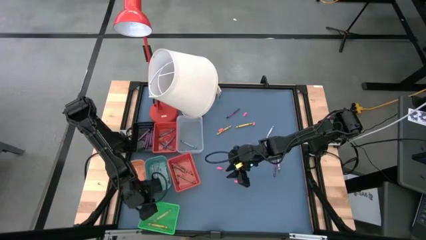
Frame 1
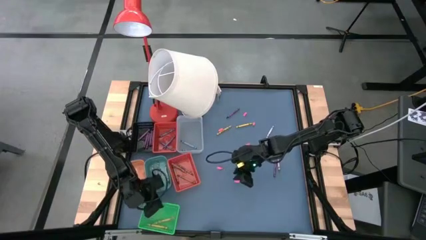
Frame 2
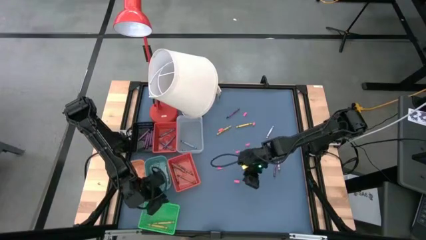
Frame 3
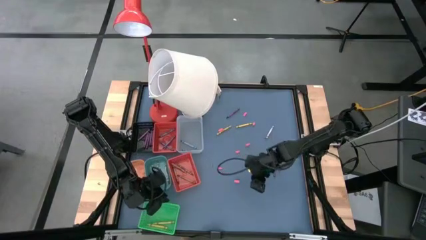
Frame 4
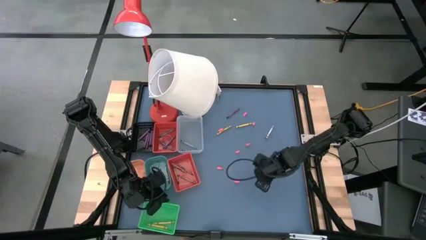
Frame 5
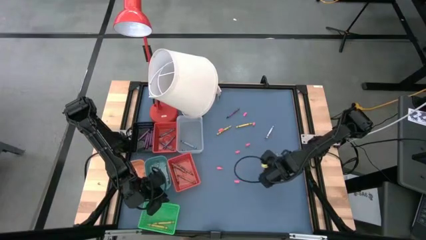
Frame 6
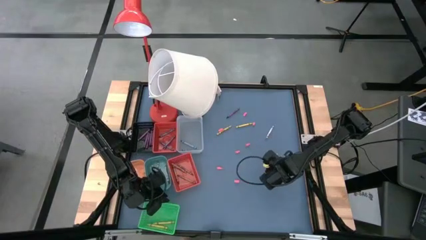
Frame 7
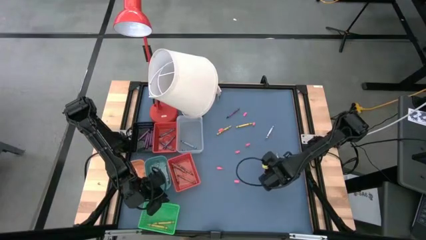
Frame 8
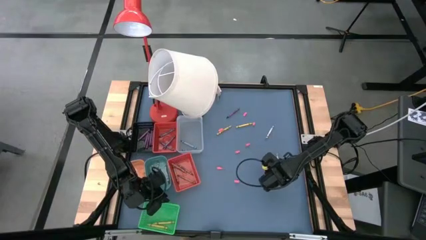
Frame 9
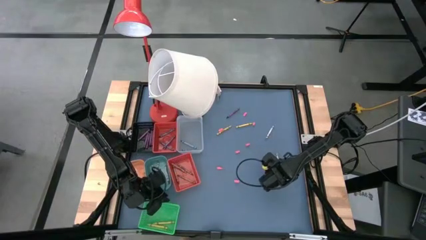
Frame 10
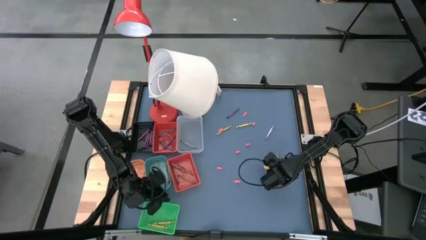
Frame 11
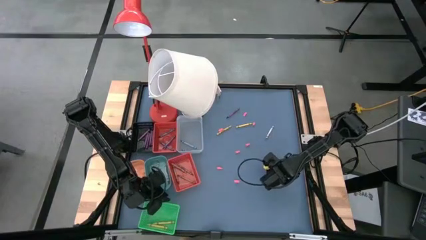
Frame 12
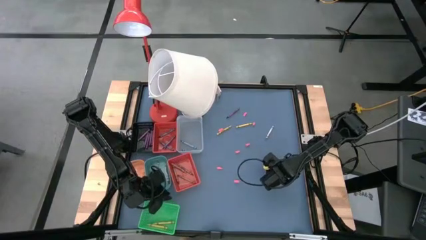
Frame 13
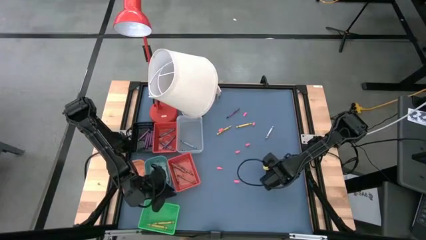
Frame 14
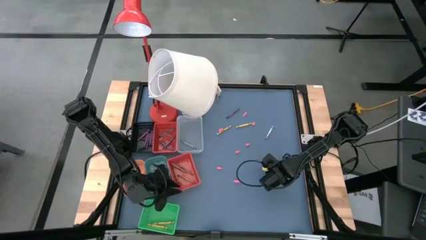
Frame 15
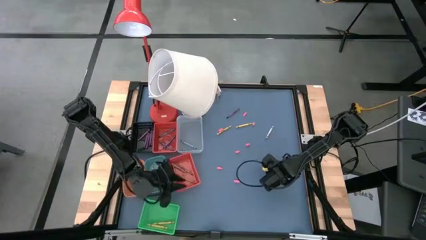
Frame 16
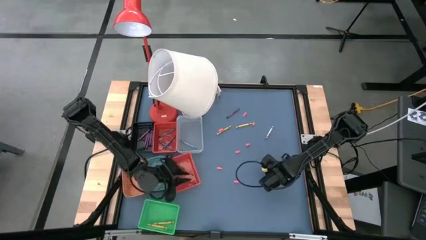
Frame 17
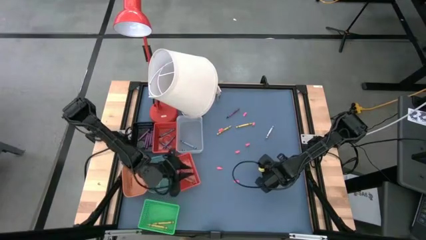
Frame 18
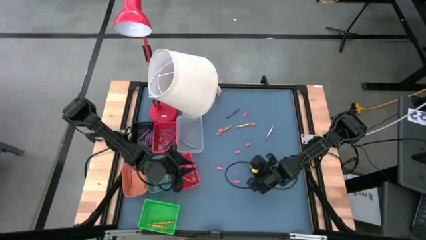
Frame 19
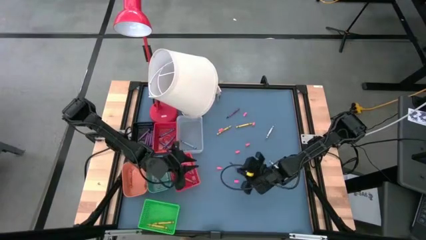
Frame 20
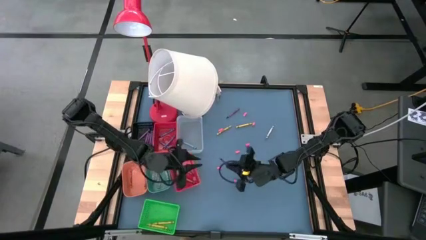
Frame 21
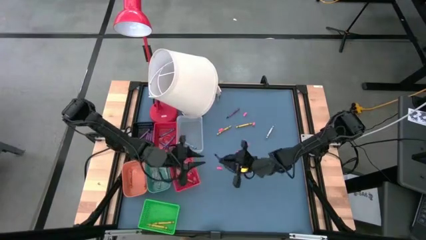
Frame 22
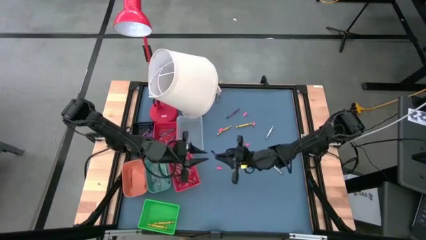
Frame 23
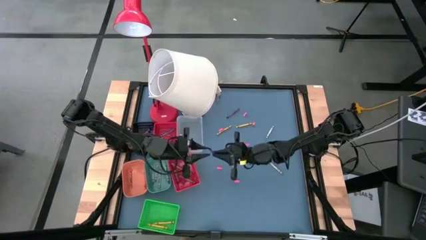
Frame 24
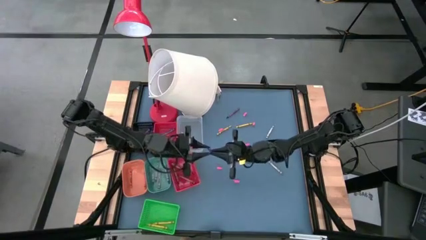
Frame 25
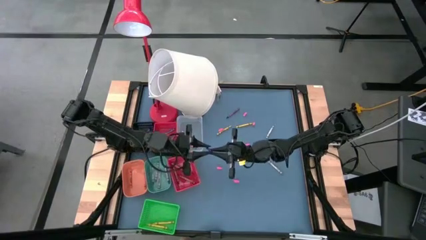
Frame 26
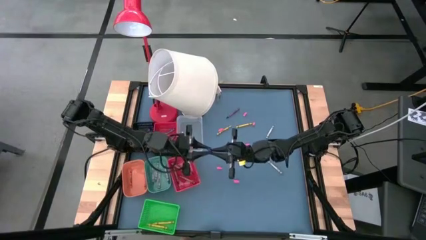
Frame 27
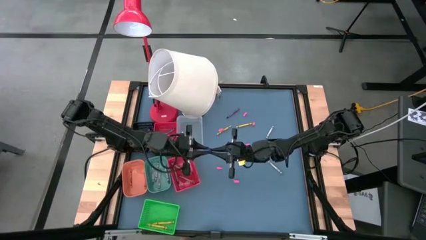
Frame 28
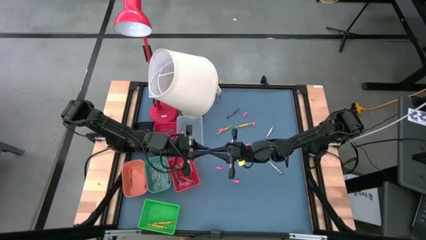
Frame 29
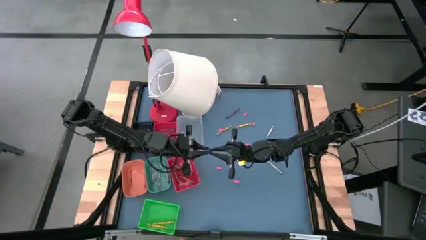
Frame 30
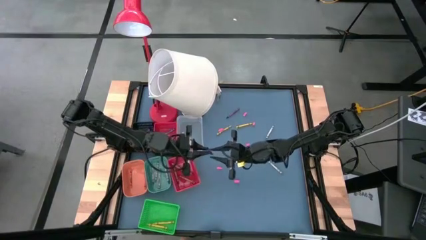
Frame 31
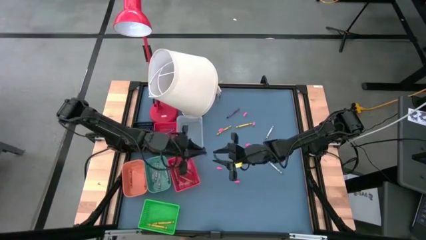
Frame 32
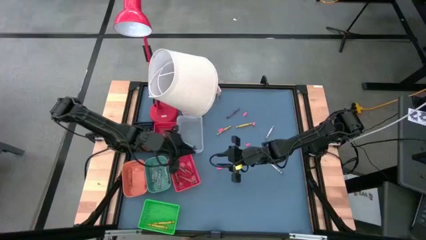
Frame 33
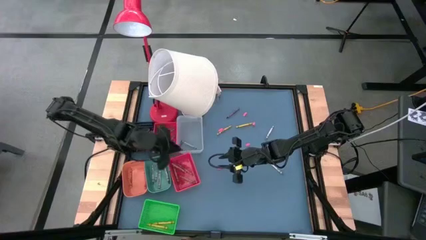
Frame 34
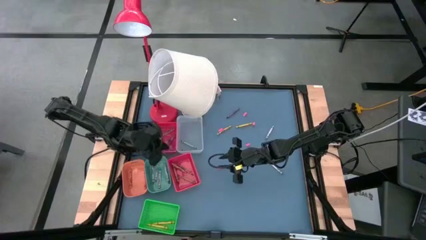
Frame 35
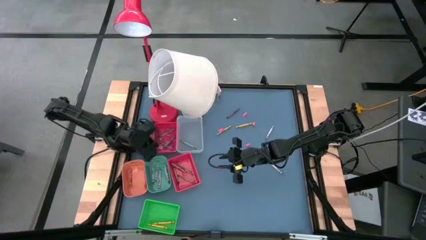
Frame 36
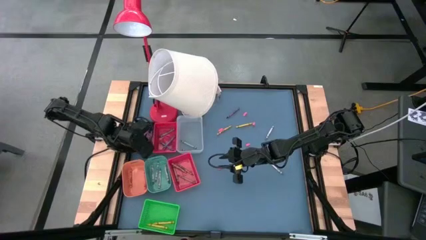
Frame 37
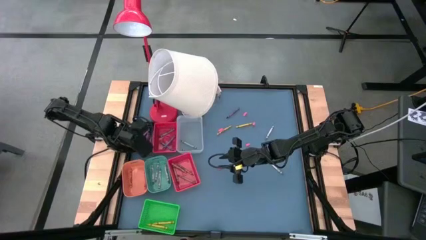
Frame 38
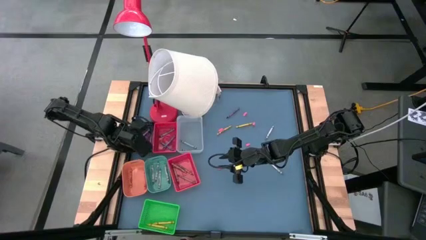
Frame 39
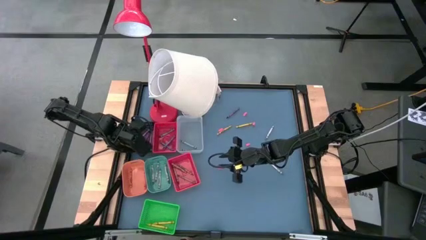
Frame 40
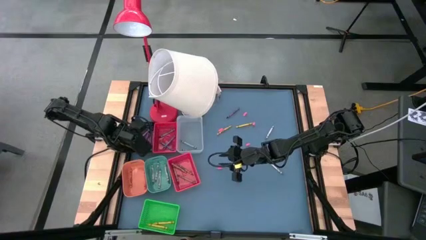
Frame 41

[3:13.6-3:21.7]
Task: Sort crayons
Put the violet crayon into the black bin

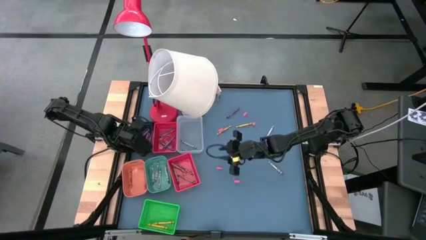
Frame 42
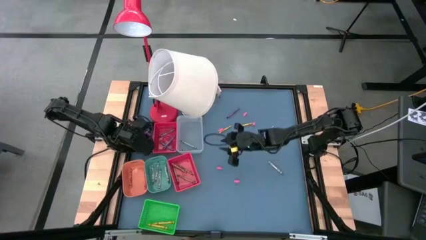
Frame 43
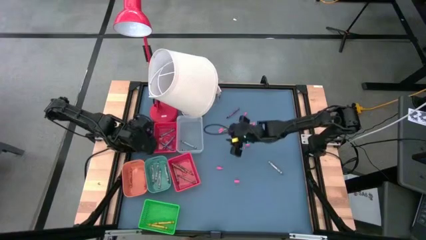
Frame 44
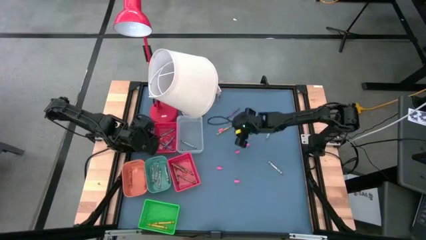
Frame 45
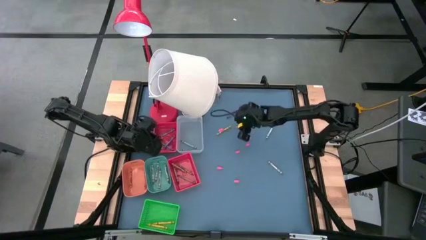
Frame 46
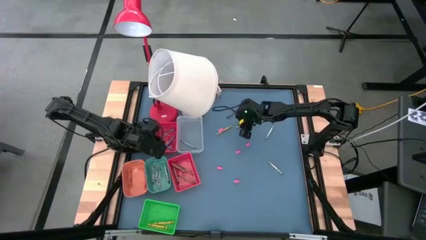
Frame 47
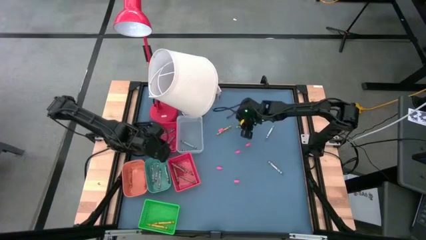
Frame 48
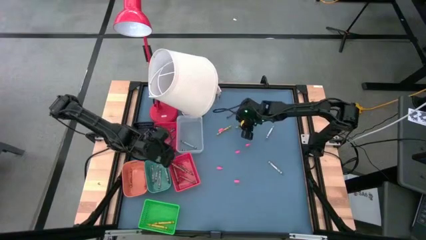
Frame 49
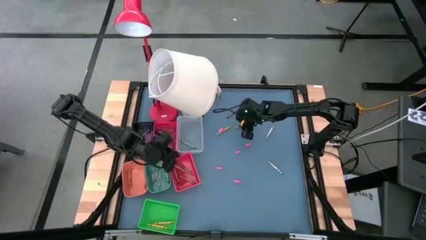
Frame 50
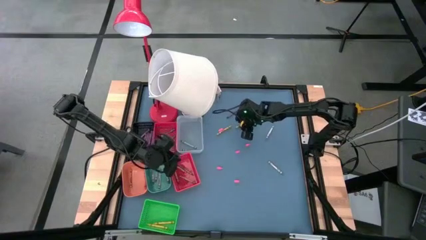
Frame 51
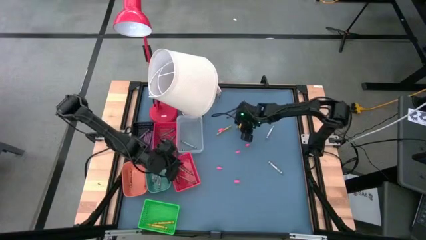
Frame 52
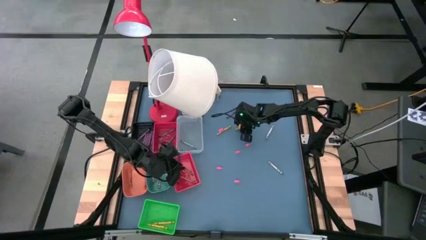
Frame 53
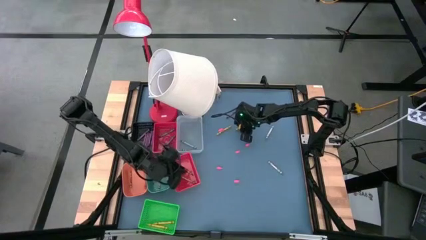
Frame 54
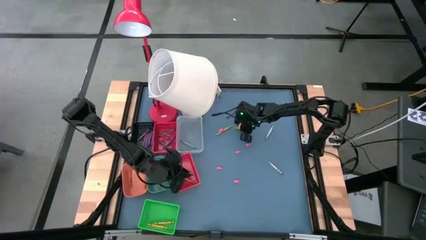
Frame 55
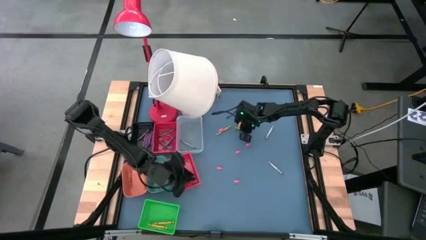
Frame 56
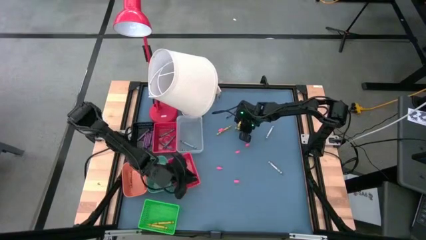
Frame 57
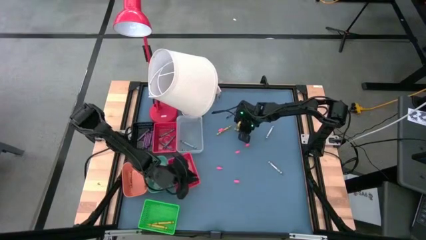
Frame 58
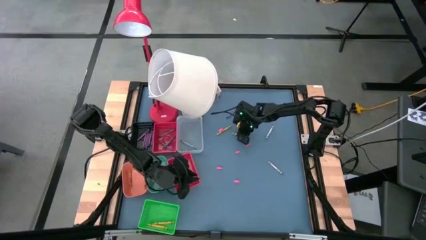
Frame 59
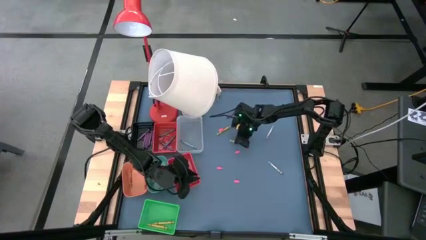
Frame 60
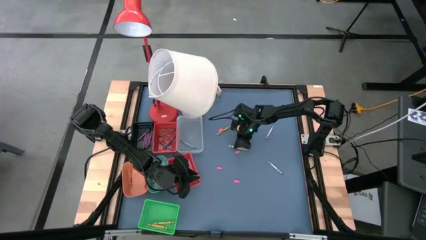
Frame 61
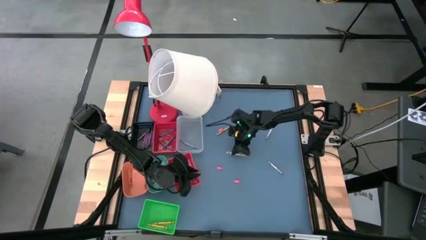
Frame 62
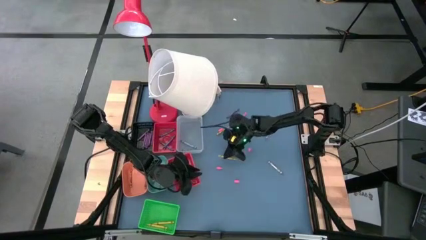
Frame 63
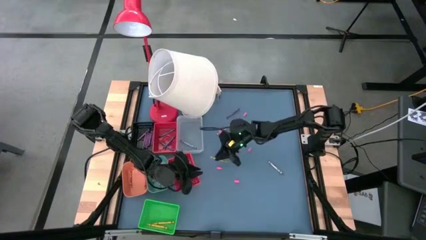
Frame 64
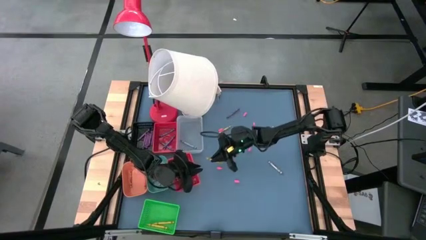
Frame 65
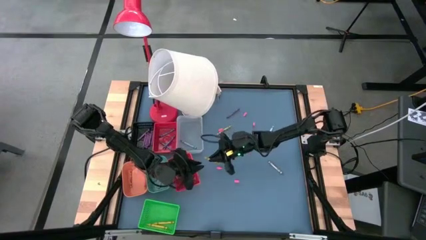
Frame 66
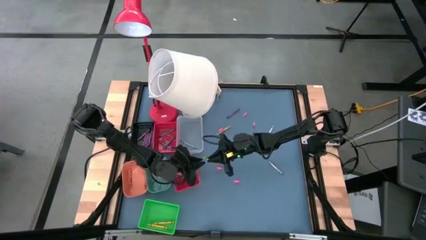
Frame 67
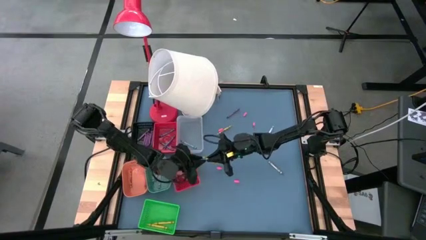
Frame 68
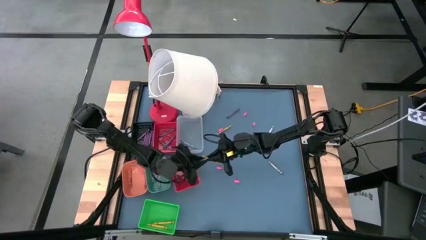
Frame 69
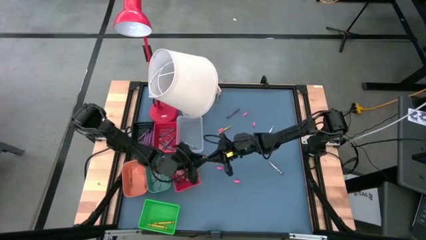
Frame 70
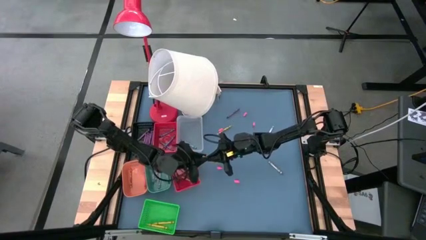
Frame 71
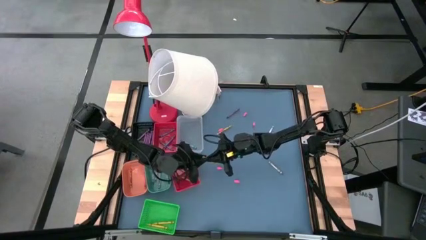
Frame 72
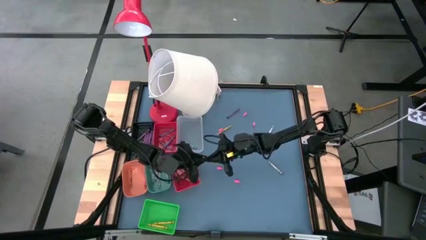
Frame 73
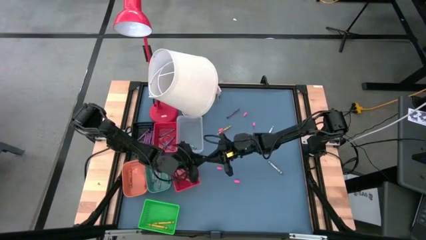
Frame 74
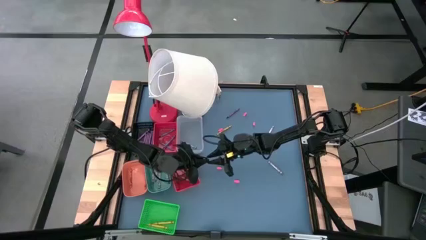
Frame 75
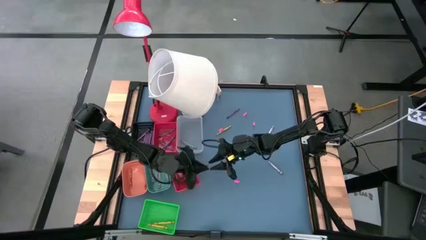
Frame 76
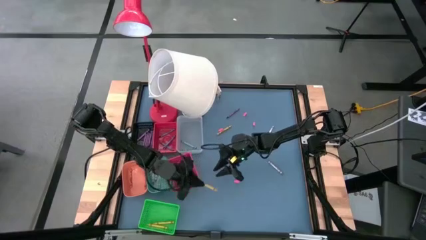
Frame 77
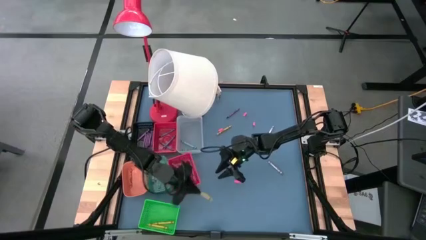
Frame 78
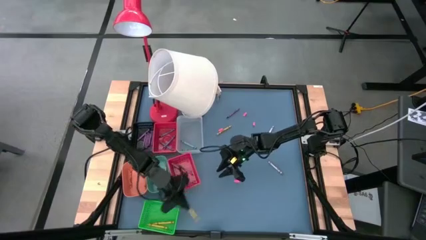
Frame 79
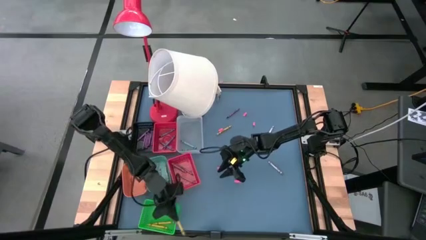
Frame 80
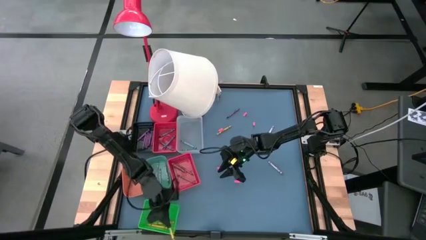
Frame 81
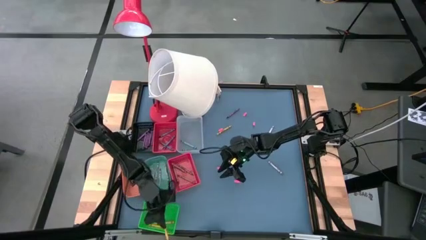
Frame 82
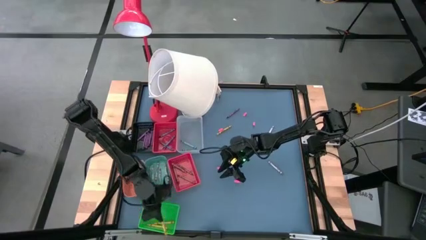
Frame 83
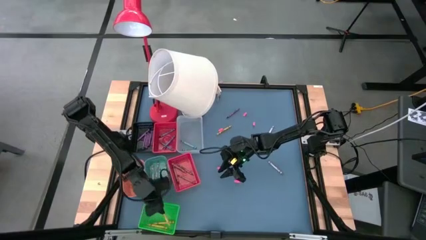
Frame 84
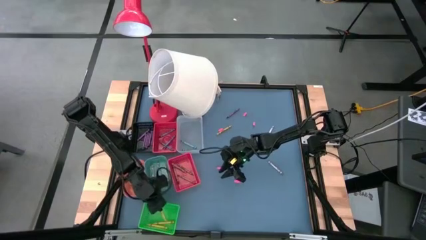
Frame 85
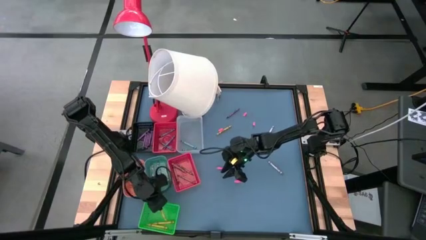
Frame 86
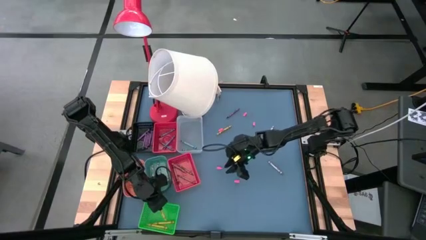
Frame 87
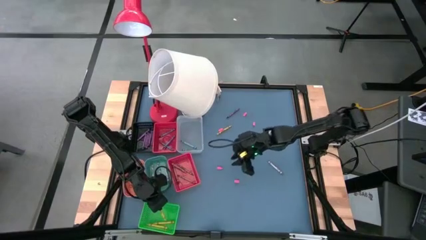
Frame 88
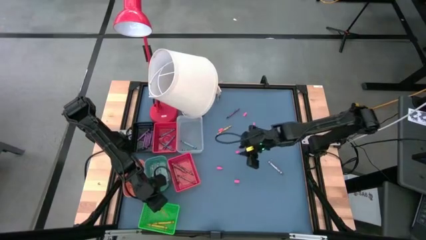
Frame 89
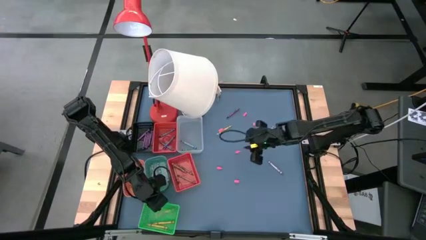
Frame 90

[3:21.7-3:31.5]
Put the yellow crayon into the green bin
